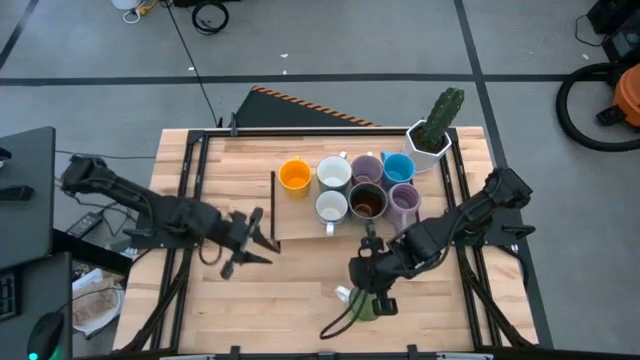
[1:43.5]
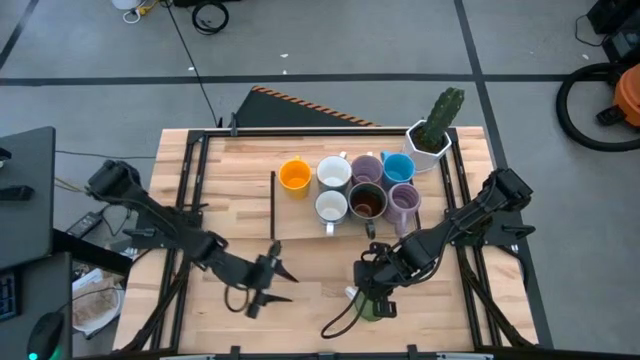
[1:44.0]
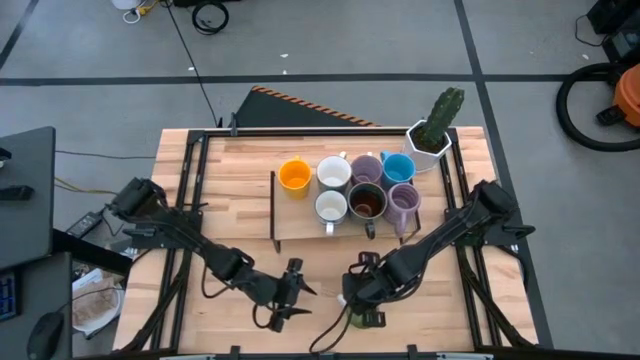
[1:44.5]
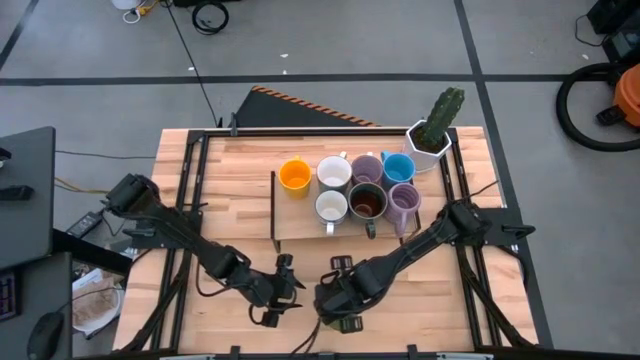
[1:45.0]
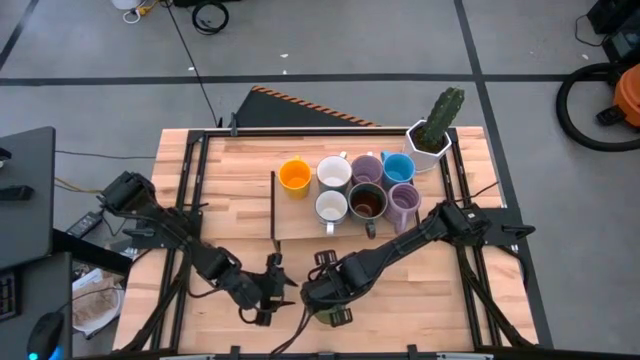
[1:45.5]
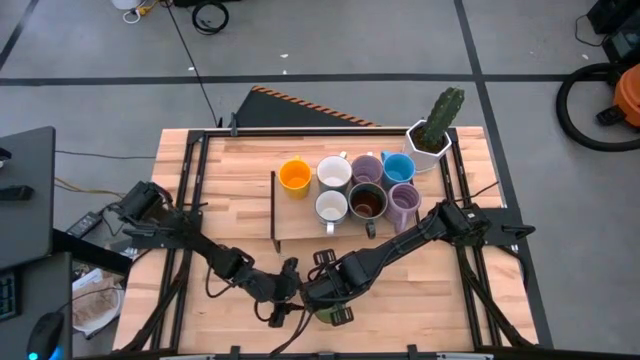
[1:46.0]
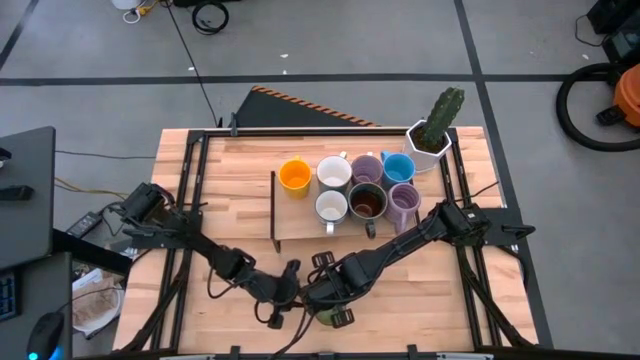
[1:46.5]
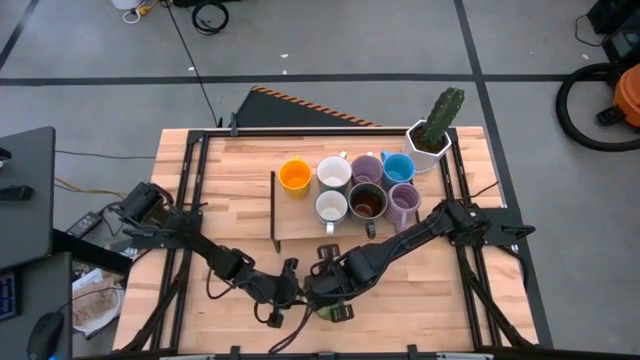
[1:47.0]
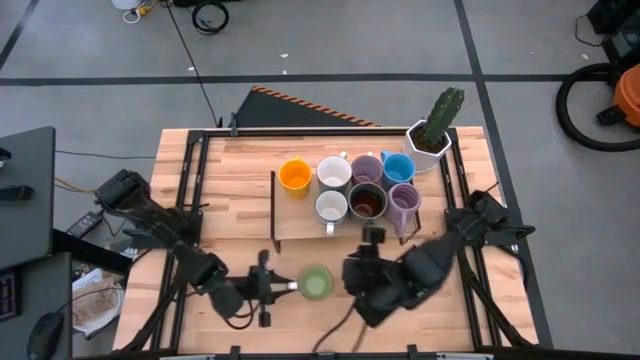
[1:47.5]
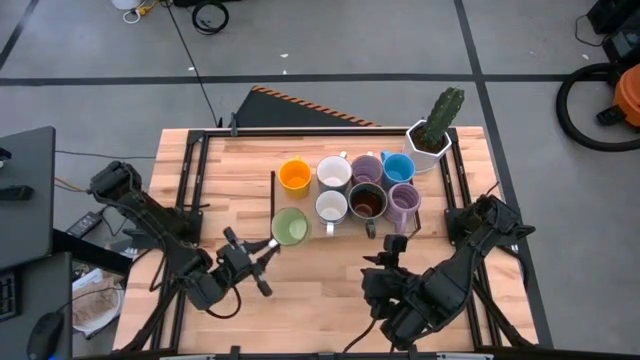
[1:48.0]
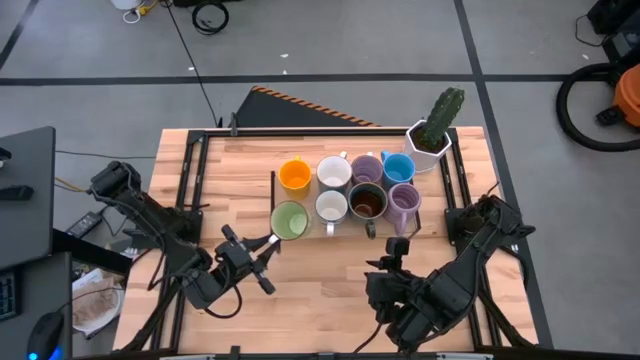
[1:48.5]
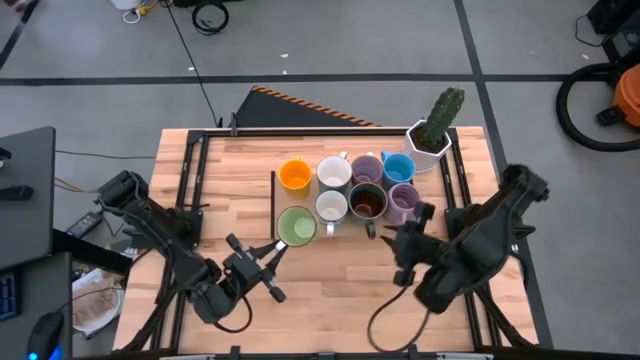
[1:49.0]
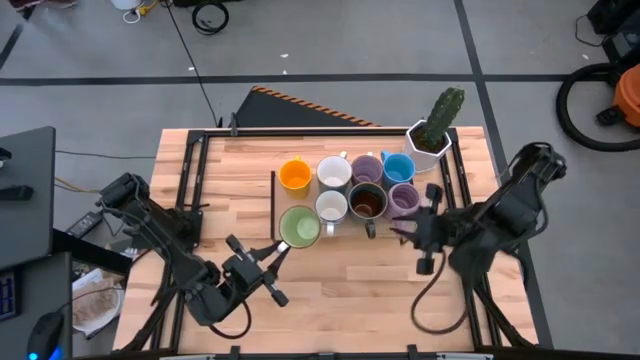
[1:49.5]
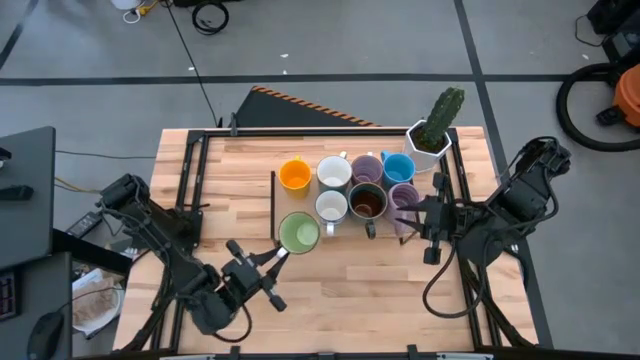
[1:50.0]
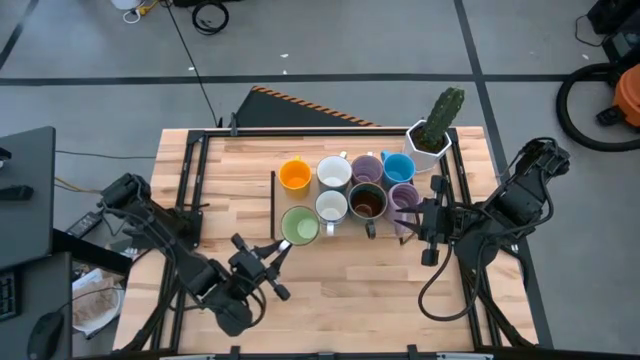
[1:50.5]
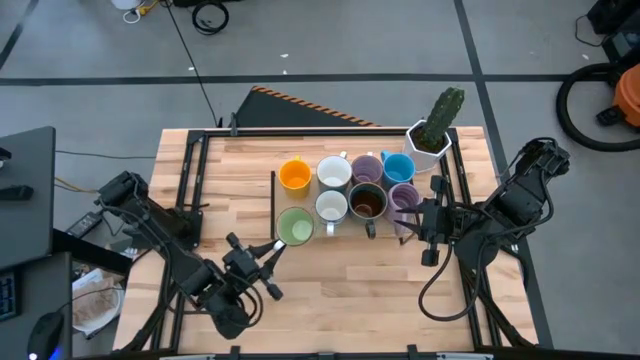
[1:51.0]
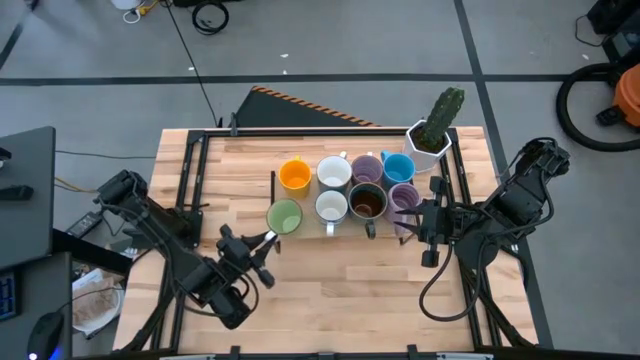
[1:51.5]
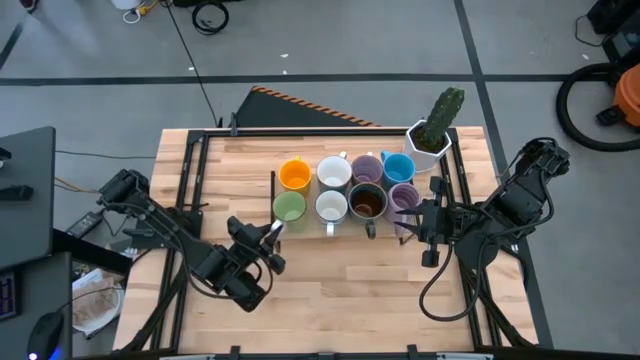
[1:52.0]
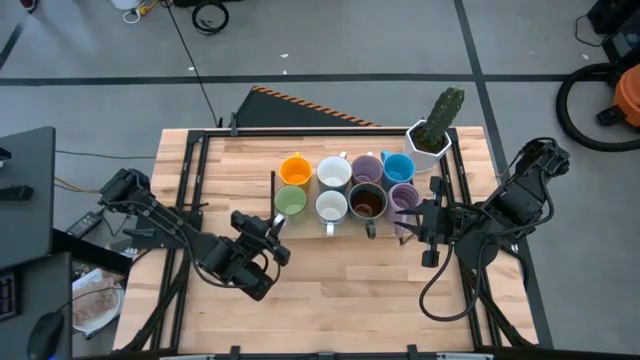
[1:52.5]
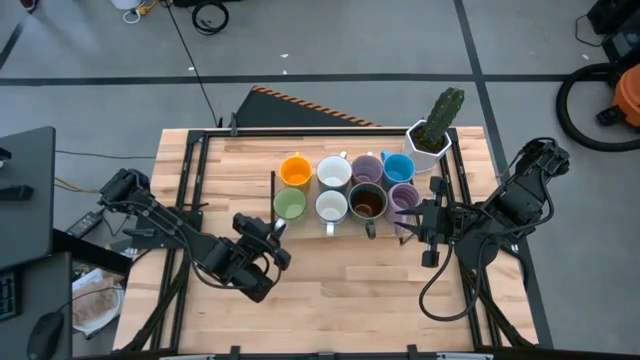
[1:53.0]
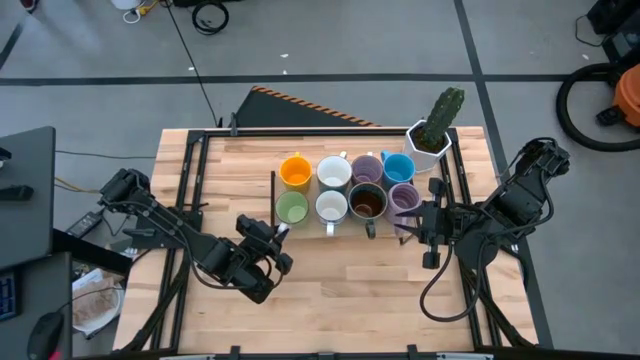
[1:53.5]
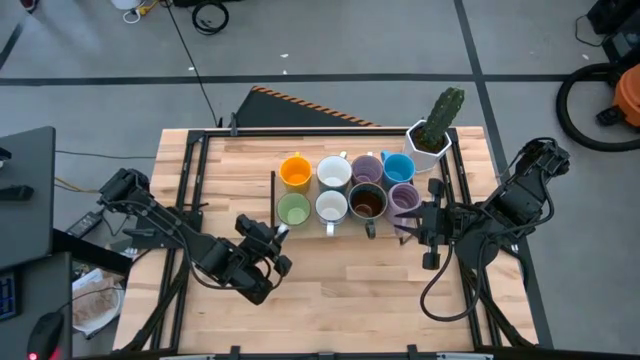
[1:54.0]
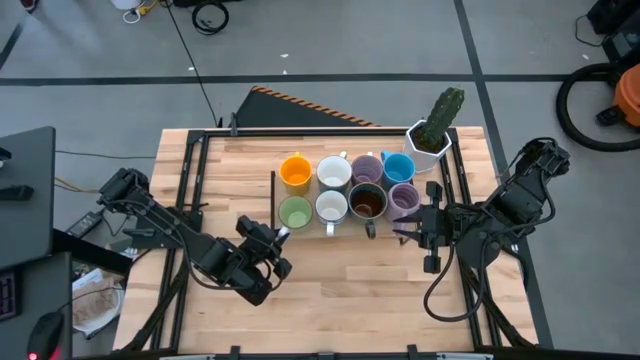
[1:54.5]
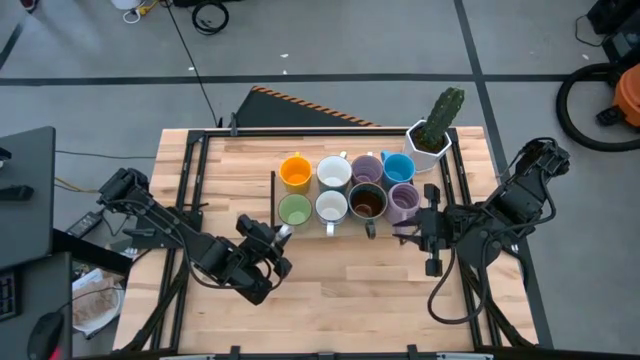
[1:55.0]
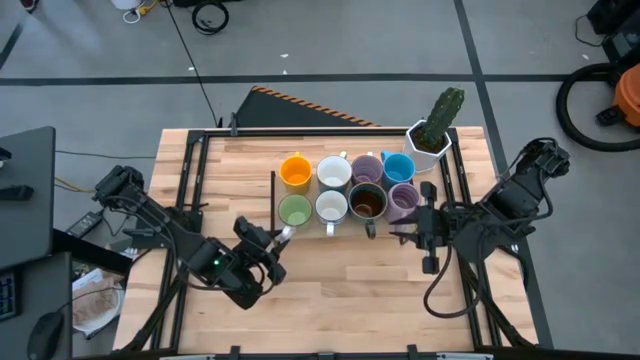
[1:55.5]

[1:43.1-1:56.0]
Task: Place coffee mugs
Put the green mug on the shelf

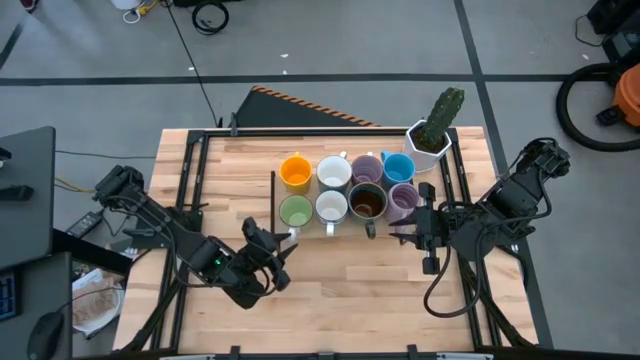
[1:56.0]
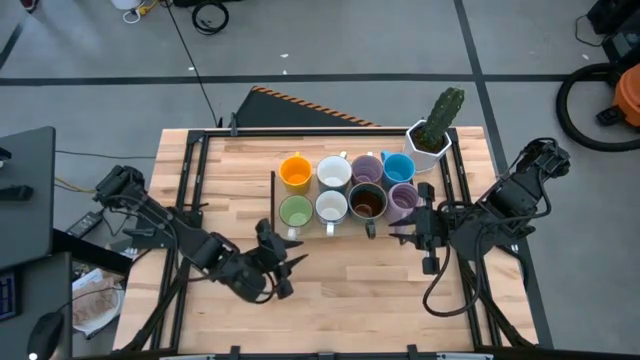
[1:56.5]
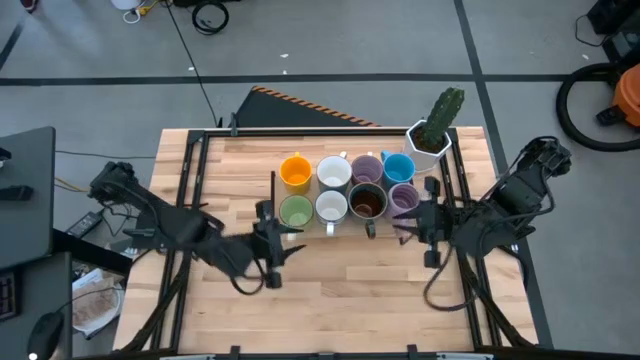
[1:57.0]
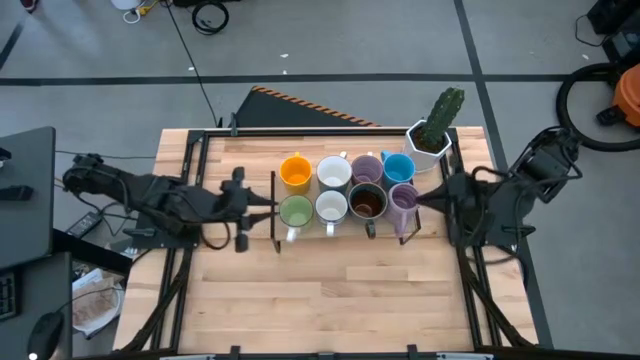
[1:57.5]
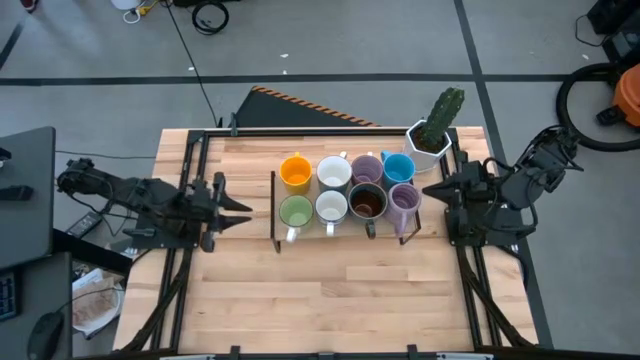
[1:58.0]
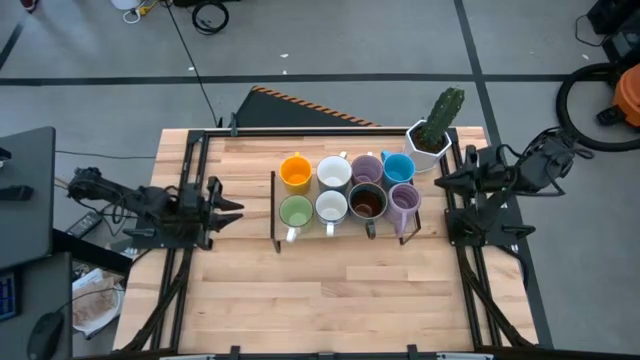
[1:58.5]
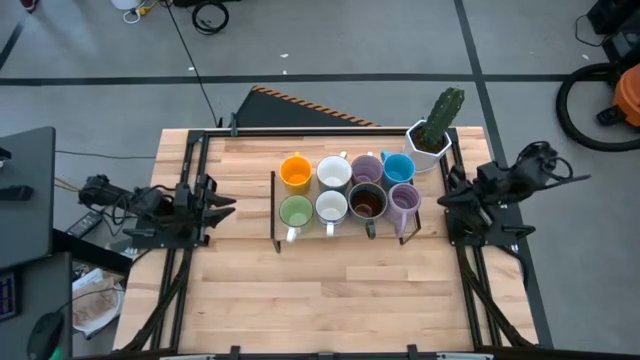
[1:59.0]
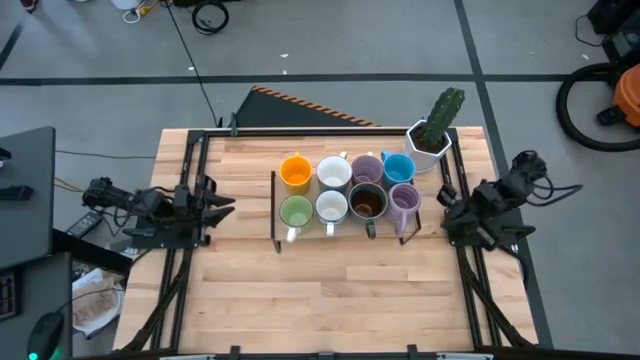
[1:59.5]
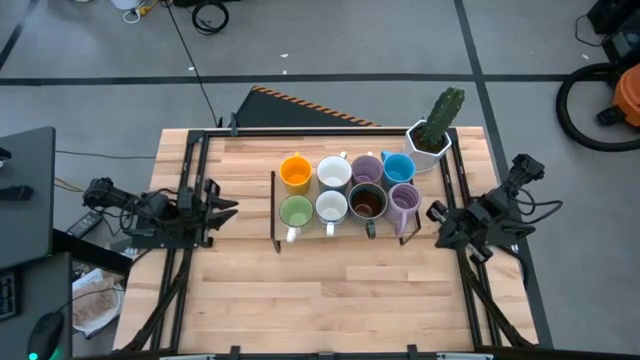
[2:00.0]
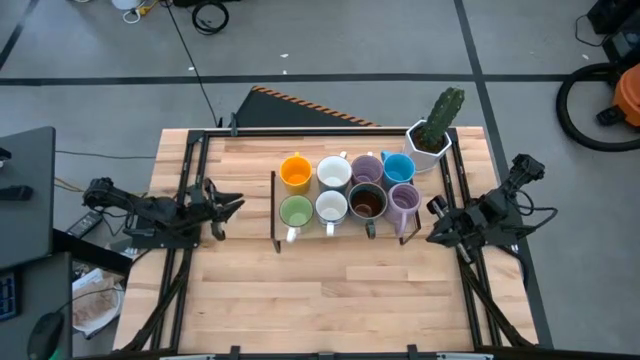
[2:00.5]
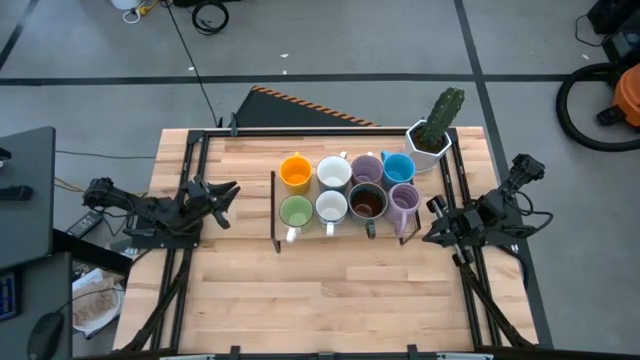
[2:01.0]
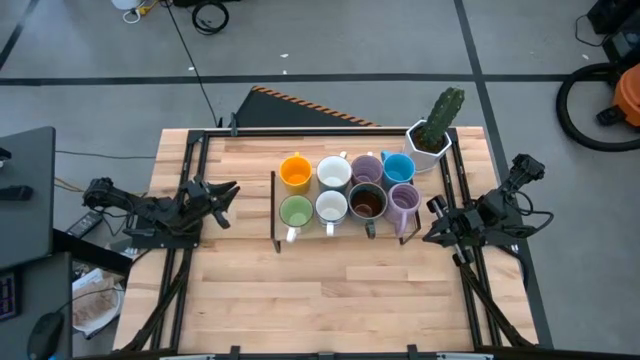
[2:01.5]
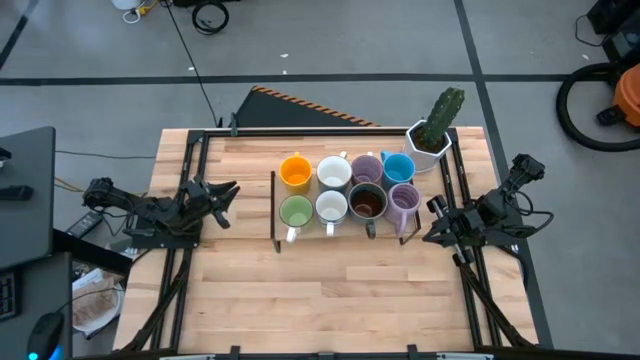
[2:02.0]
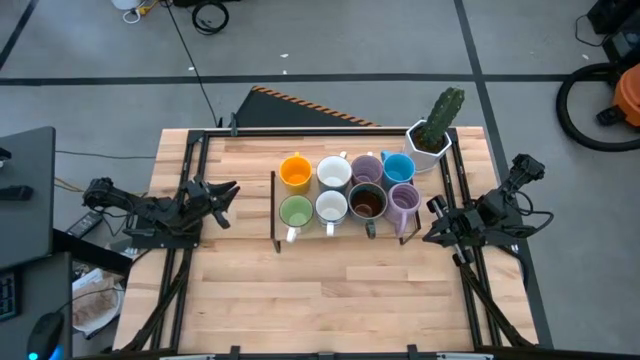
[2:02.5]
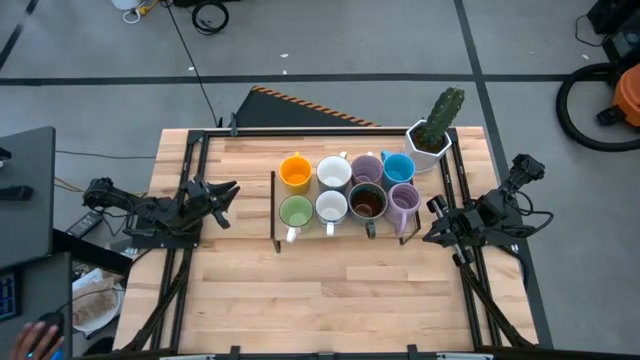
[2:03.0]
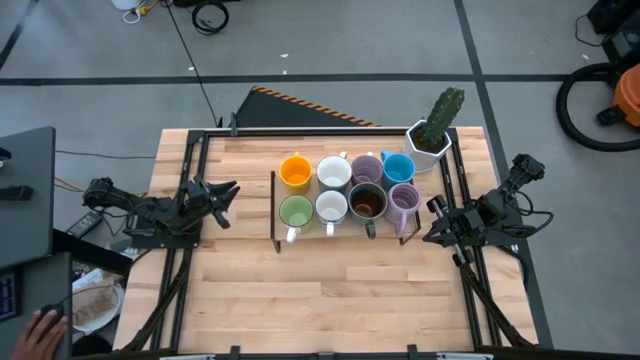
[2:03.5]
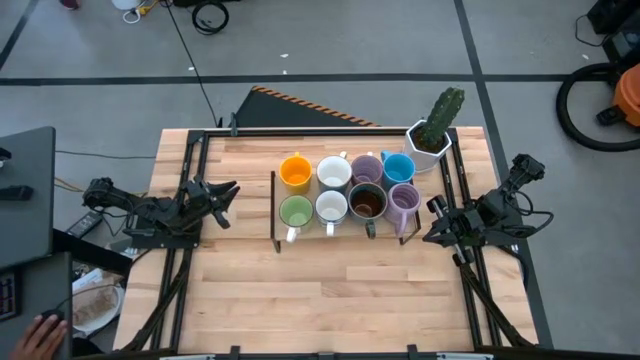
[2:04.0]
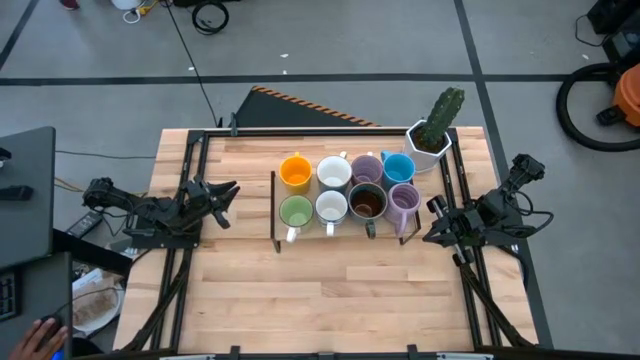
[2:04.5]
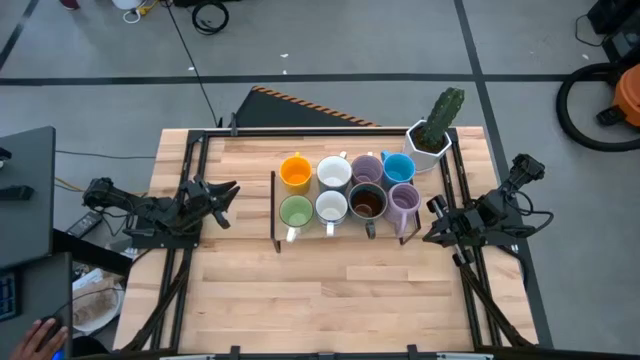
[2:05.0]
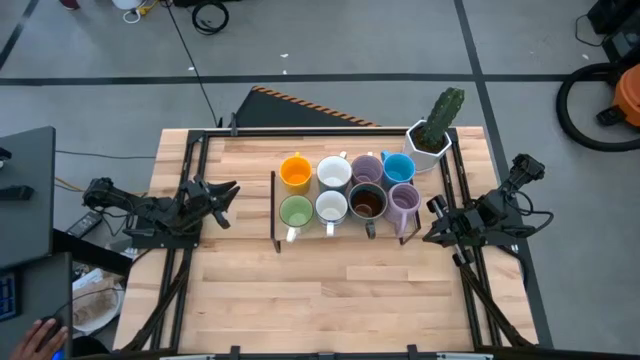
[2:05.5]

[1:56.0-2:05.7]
Return to Home Position
